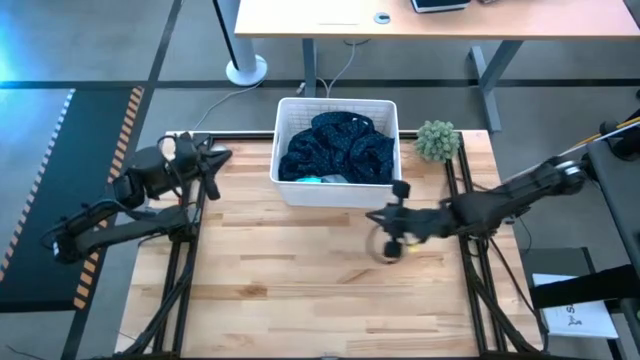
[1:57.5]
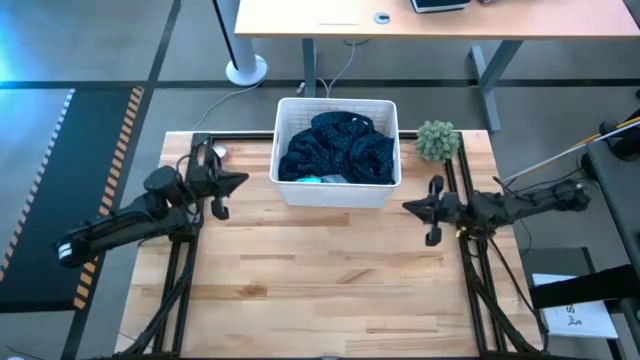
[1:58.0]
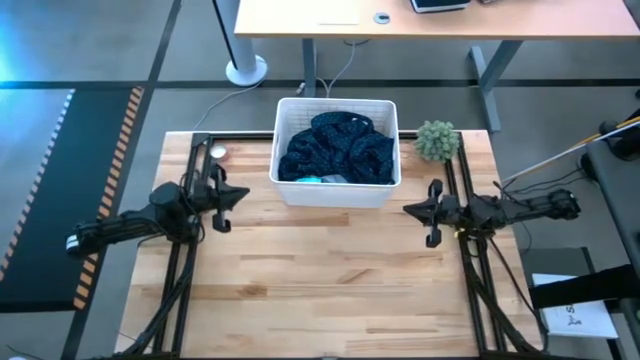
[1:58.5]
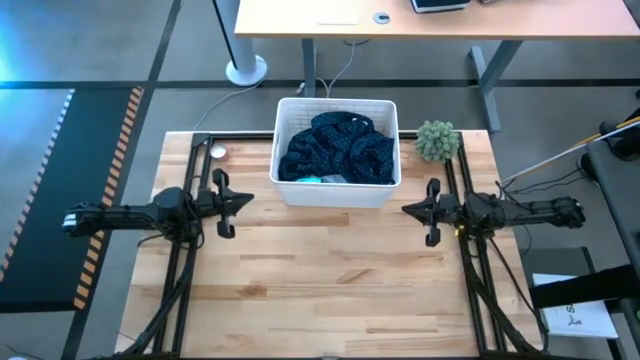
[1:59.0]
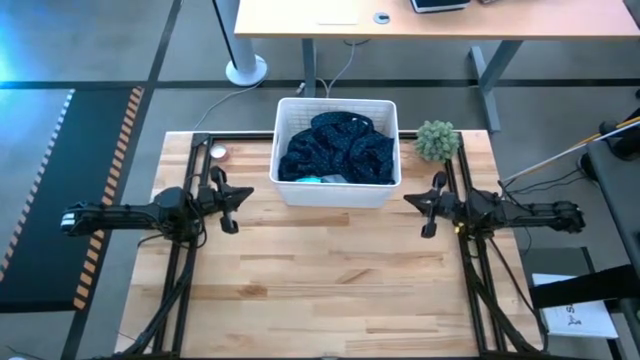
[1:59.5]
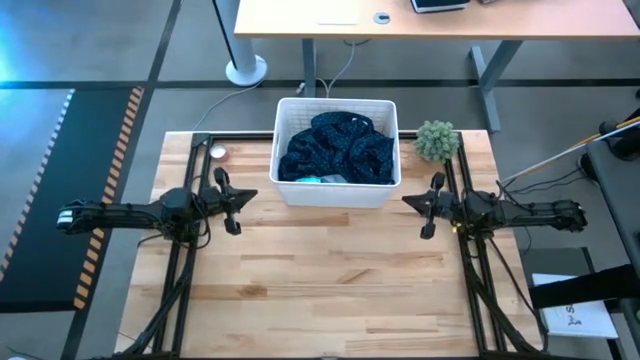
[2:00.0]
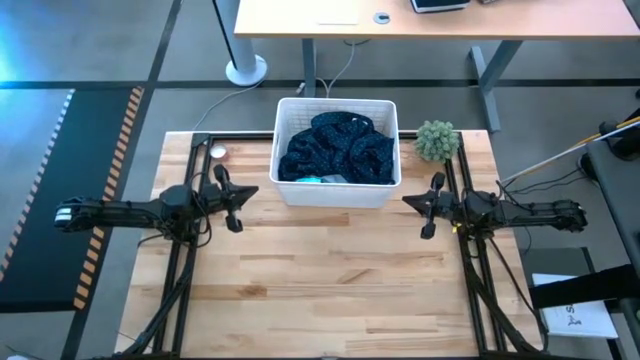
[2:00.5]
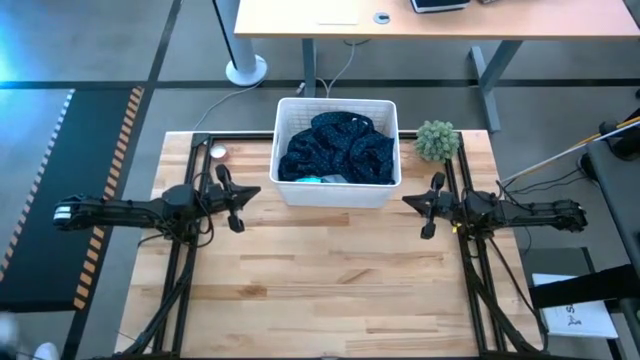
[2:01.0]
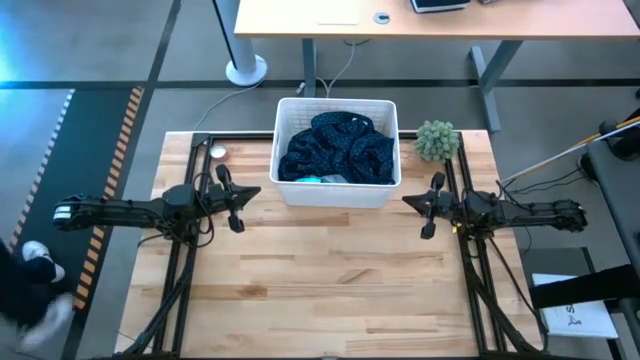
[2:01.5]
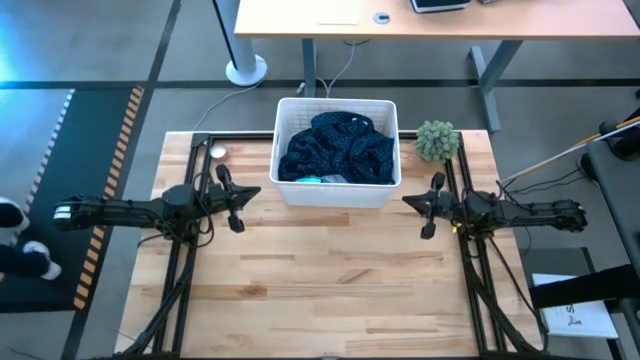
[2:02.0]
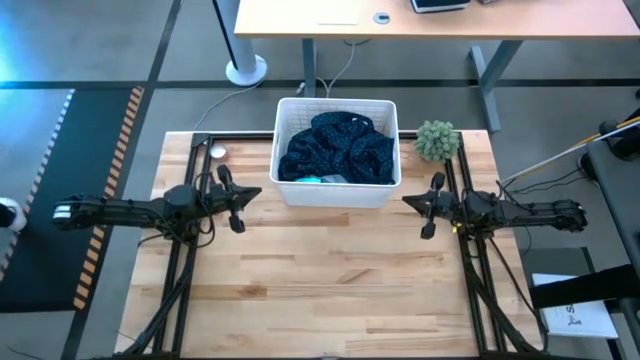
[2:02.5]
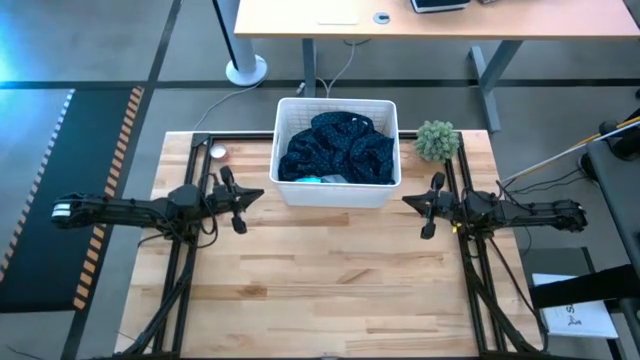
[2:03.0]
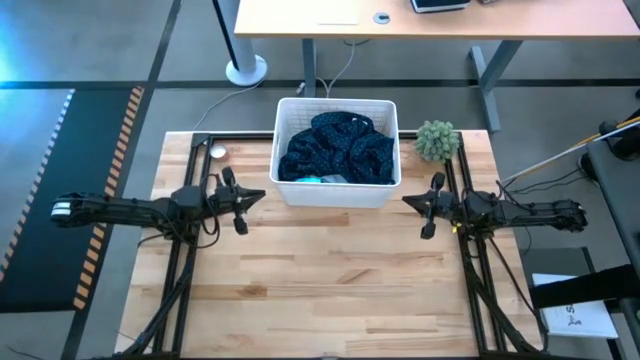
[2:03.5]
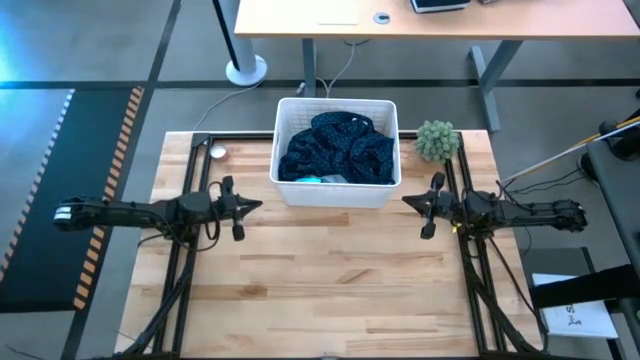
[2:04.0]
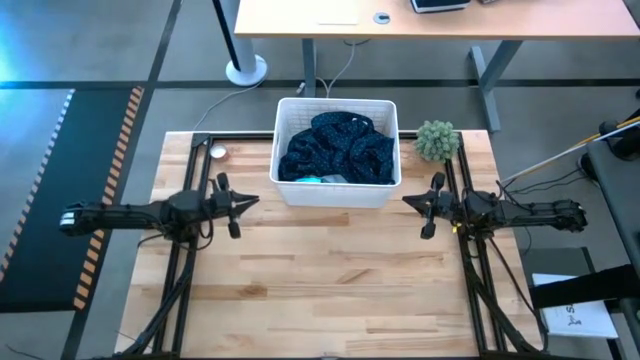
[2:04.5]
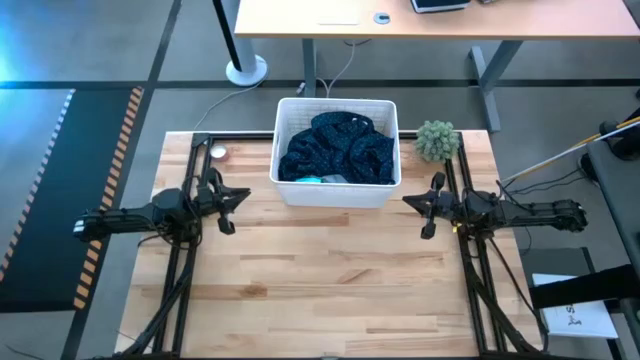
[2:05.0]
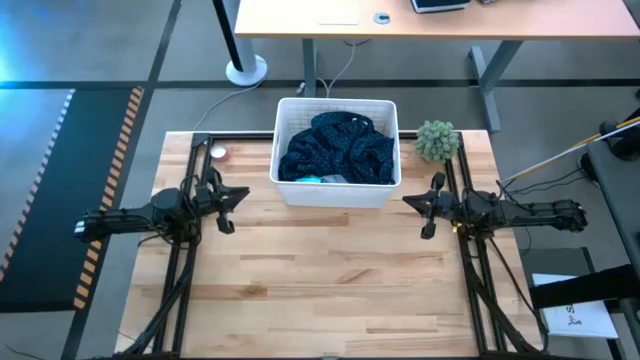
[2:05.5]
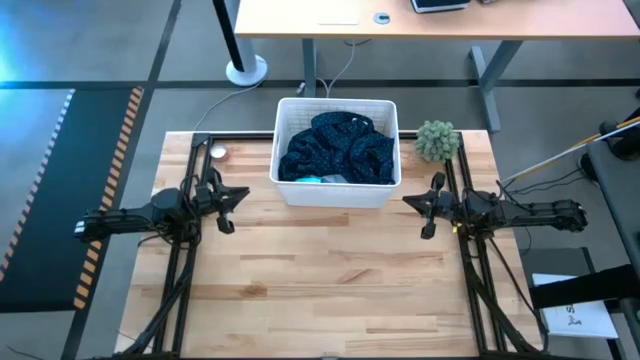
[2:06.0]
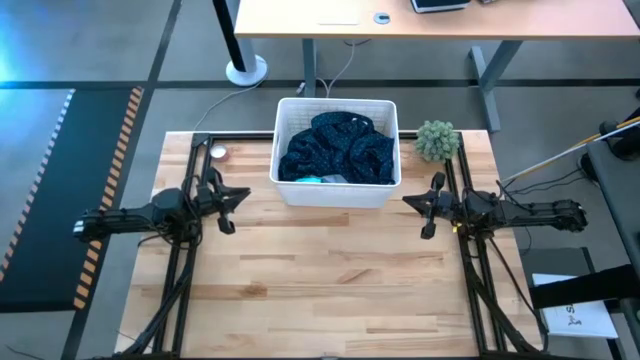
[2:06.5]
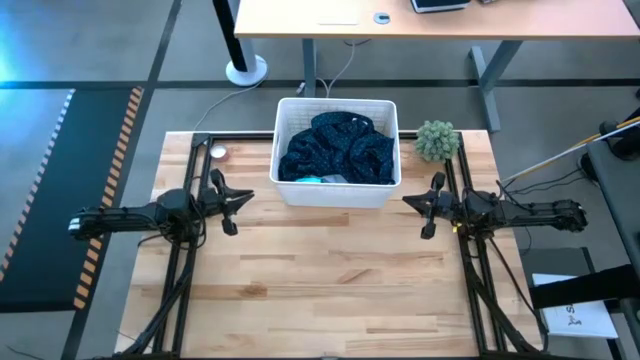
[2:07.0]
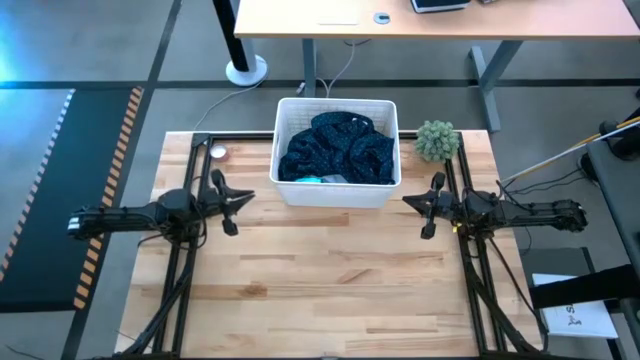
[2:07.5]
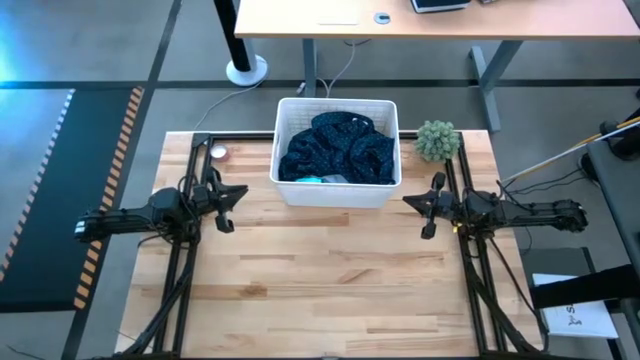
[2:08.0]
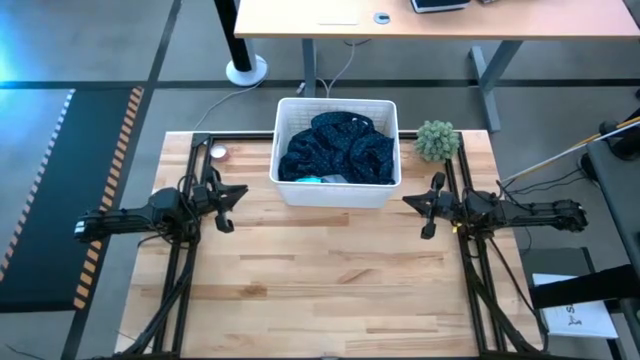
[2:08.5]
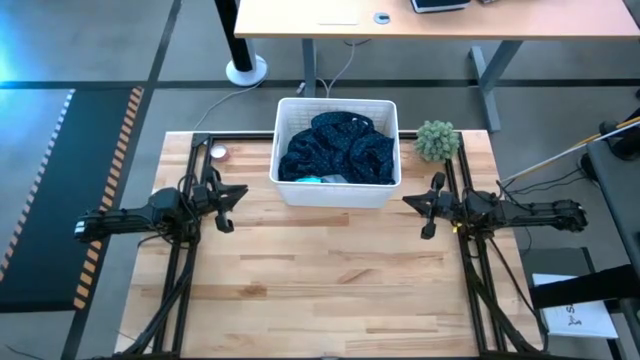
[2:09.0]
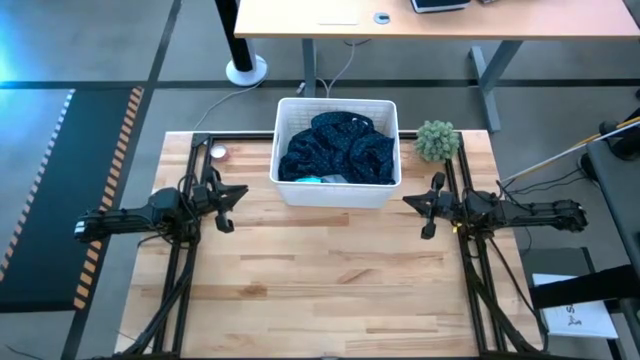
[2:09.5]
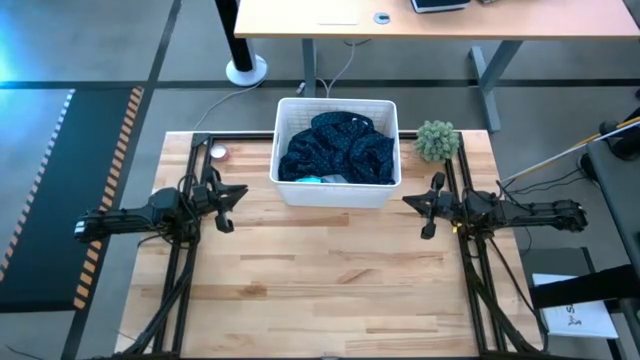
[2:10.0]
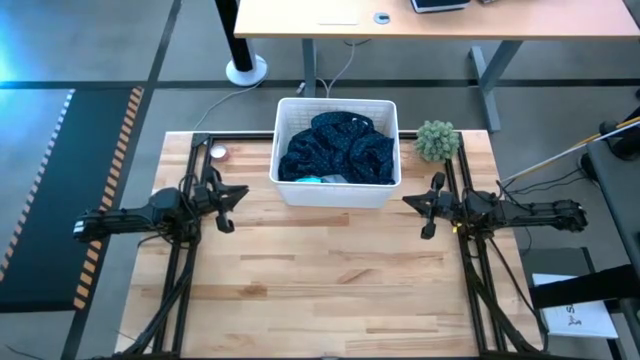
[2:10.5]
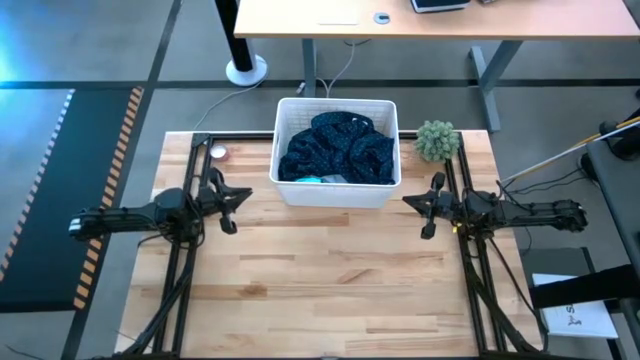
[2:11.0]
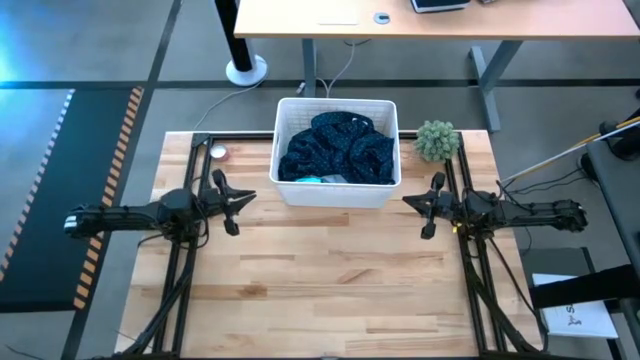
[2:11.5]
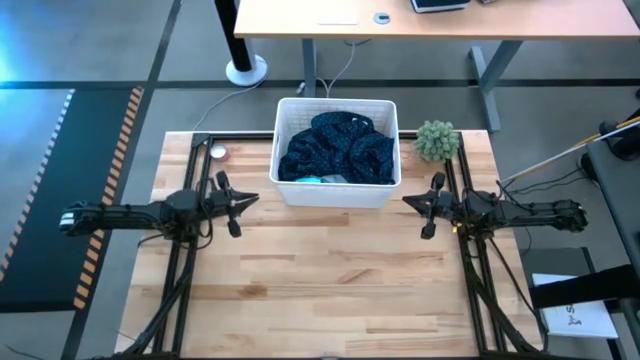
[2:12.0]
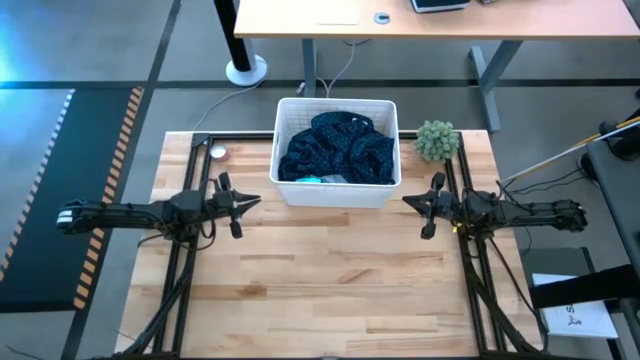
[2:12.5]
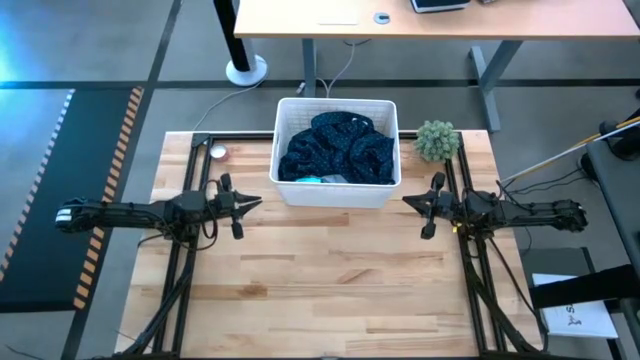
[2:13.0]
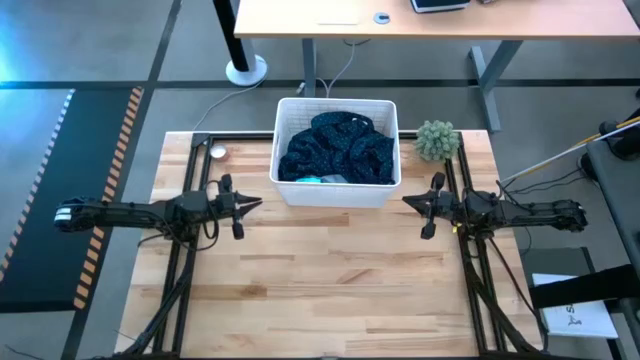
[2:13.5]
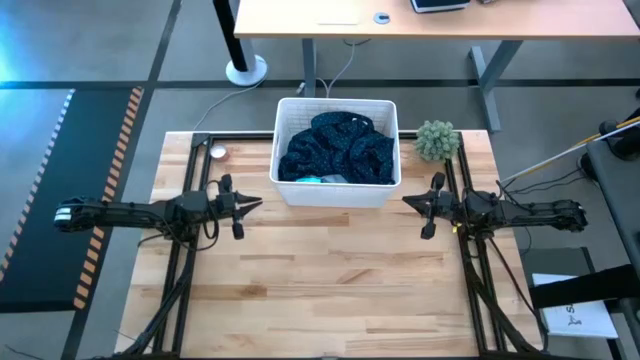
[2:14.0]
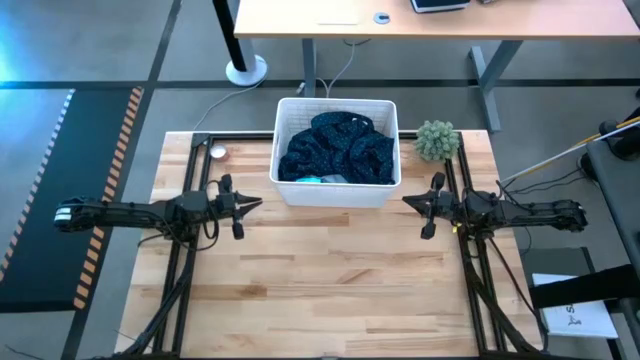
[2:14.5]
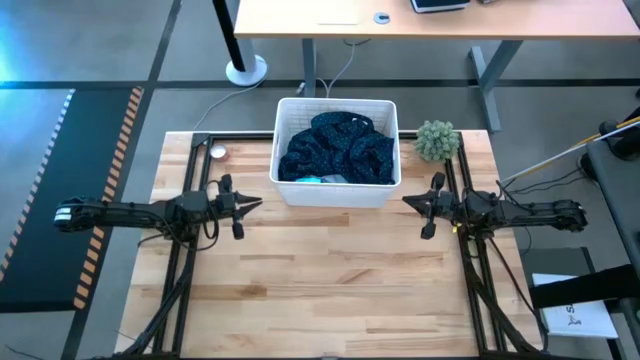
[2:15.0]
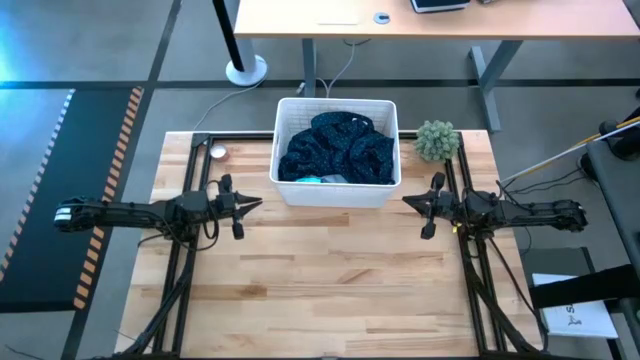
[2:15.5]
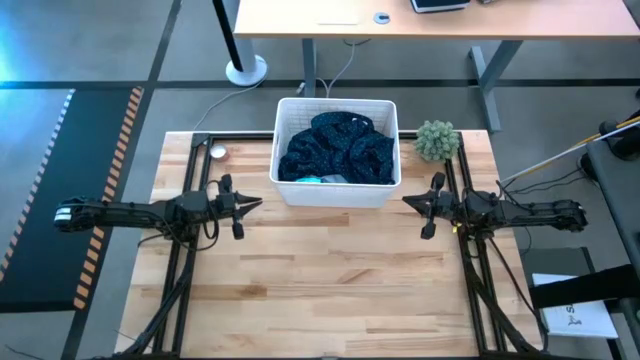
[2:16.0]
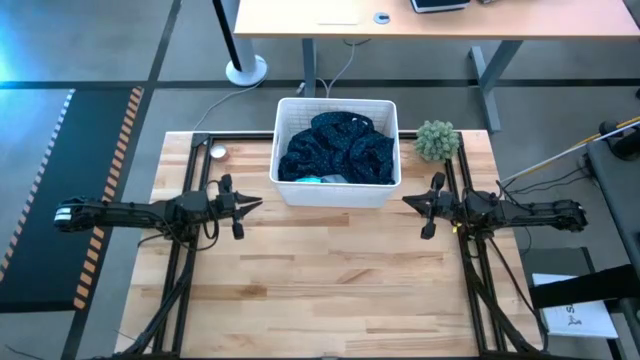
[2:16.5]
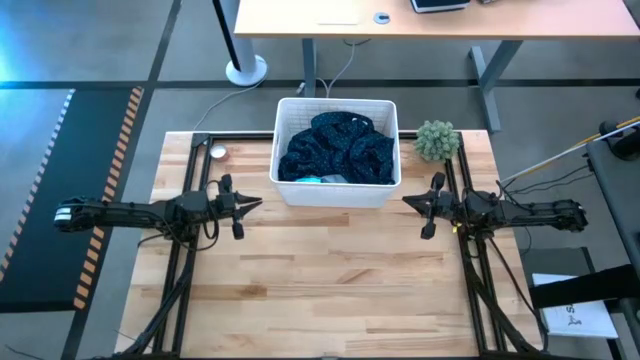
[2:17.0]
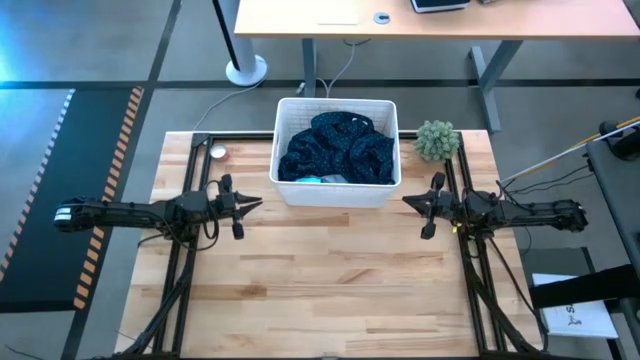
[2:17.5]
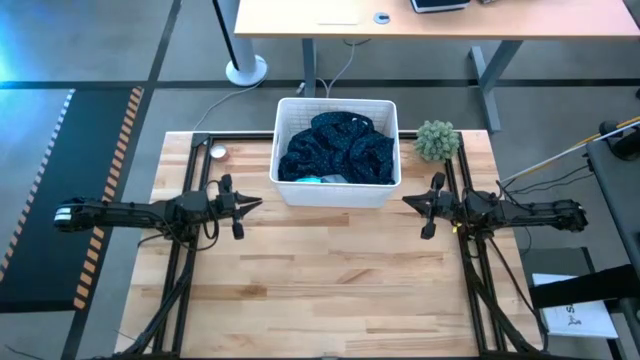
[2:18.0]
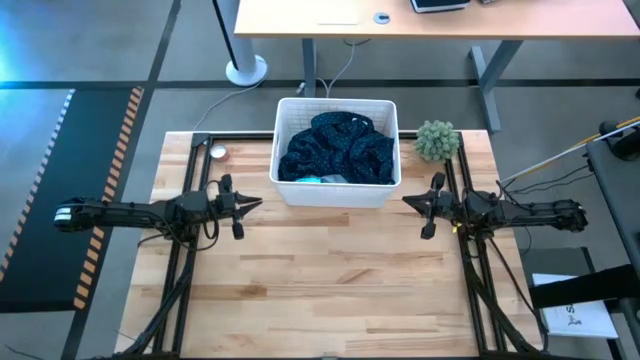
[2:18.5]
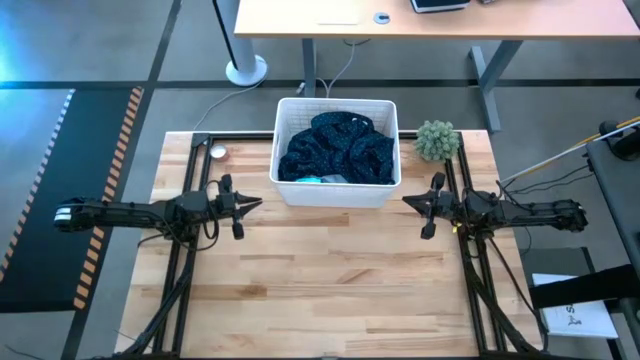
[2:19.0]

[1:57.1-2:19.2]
Task: Sort clothes
Return to Home Position
